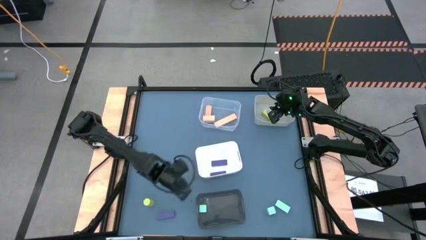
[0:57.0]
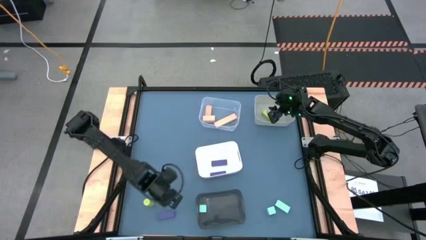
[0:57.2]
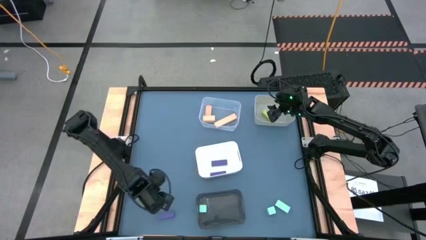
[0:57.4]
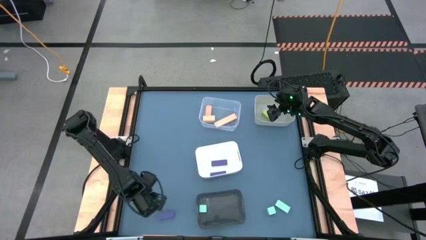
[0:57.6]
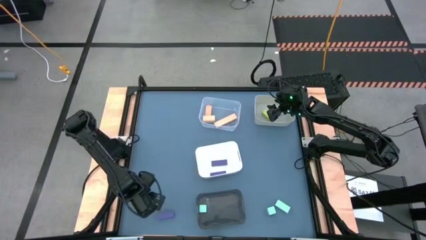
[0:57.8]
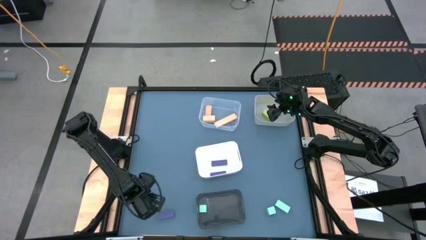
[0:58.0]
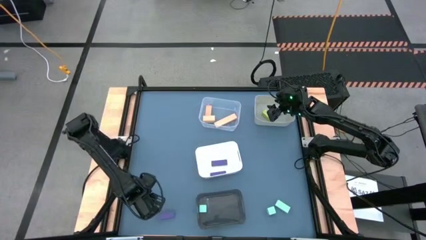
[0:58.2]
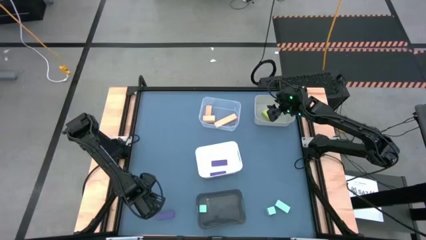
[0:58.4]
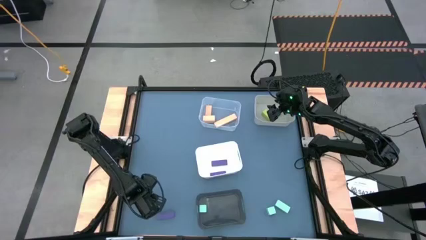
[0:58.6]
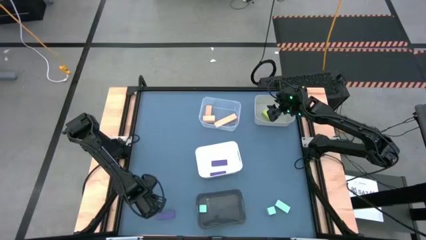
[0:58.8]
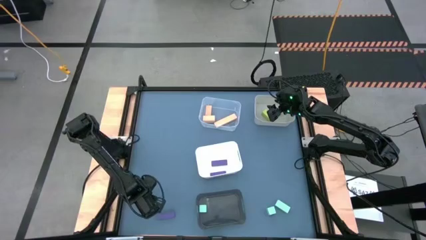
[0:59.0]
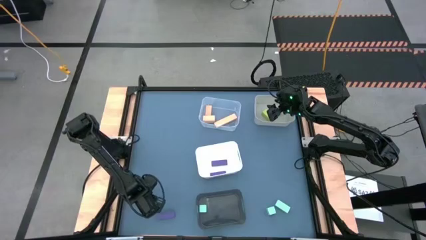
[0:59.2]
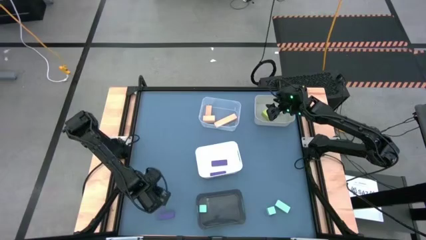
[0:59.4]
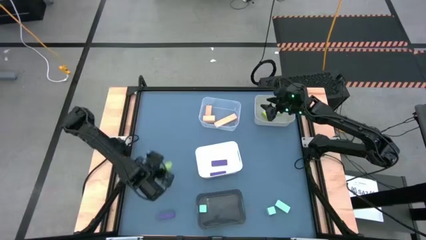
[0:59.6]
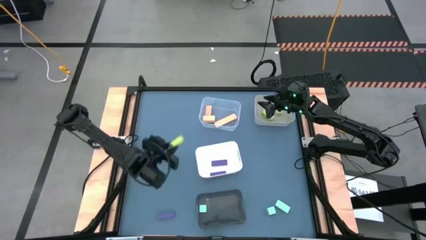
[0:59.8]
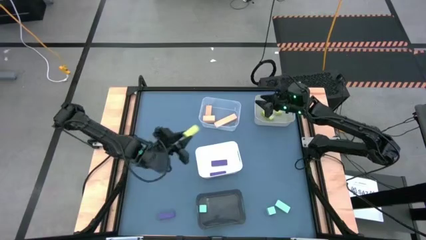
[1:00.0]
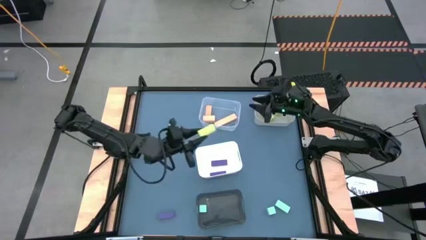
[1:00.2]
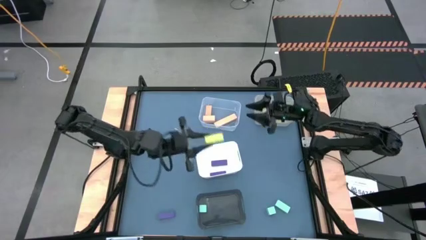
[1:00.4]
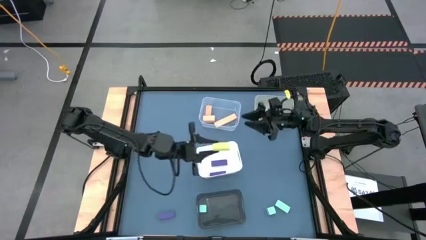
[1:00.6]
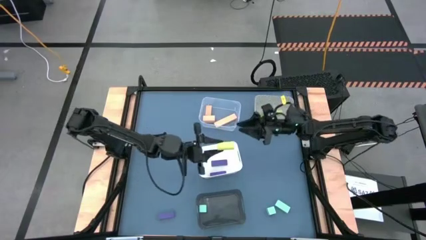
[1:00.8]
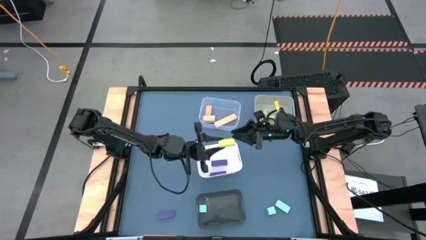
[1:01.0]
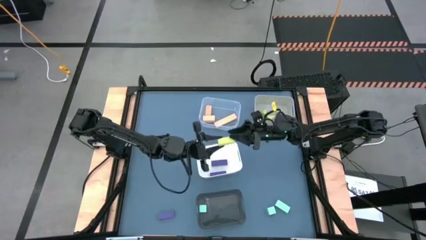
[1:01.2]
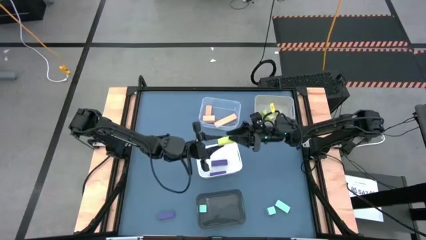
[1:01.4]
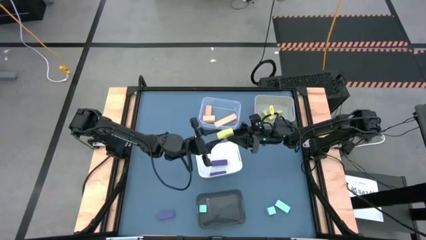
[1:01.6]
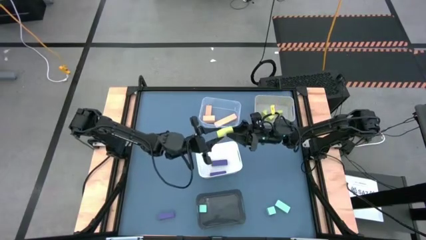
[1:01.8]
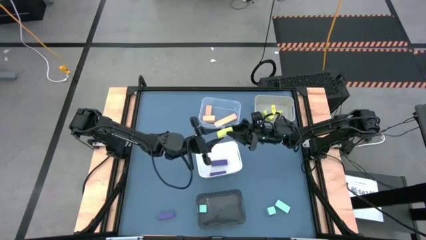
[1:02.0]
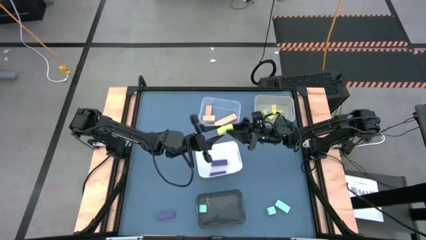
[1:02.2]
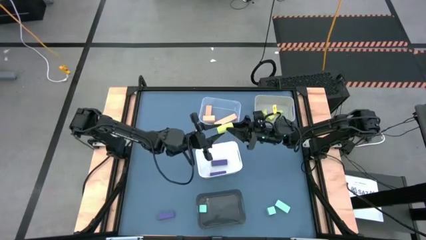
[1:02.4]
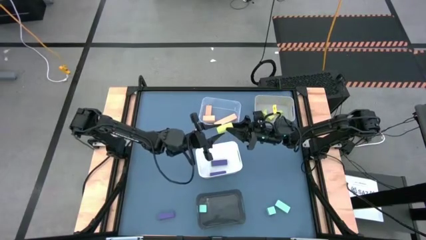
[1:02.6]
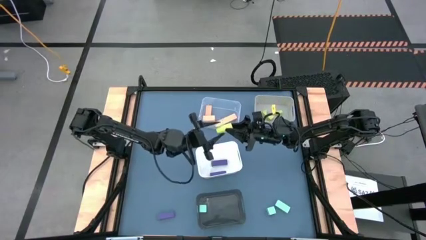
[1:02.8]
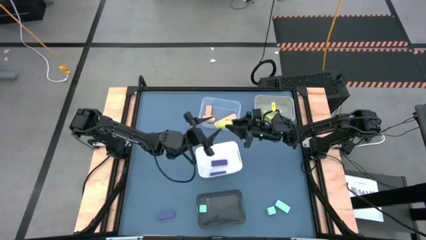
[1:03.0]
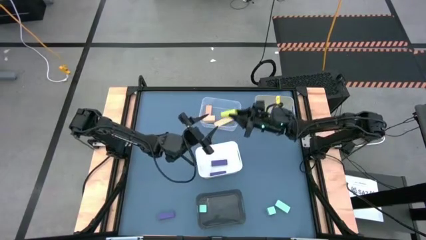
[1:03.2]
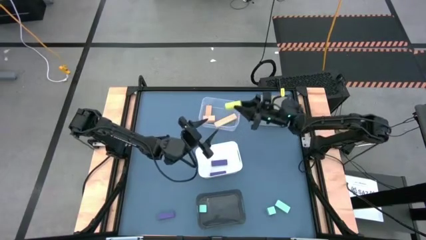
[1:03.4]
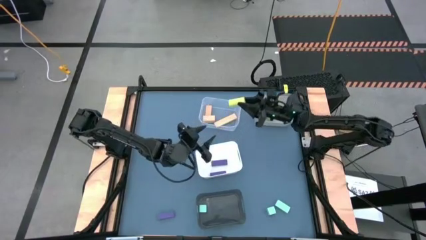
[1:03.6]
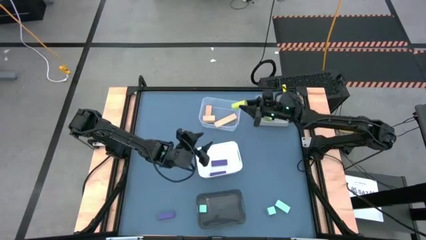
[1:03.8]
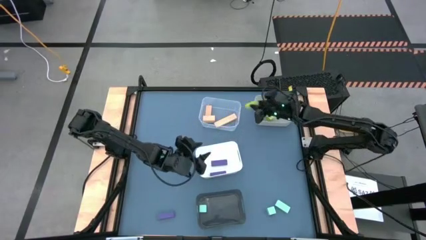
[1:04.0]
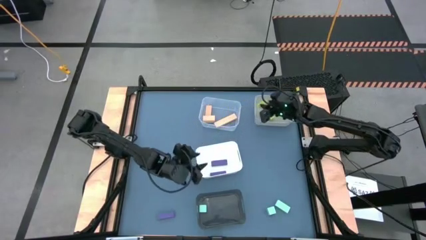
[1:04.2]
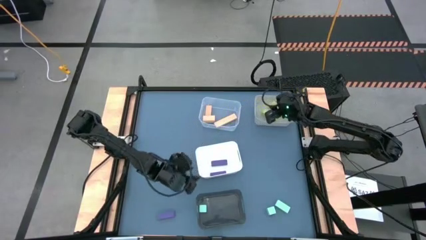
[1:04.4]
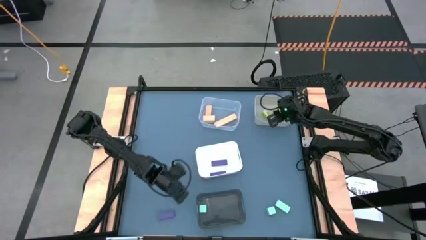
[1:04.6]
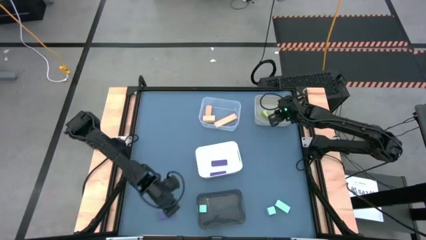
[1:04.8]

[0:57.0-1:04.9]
Task: Sort & place blocks by color
Put the yellow-green round block into the grey bin

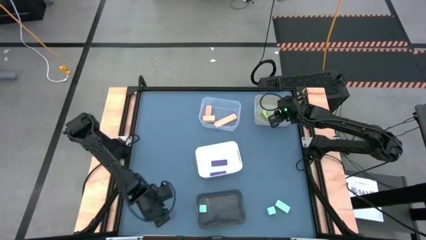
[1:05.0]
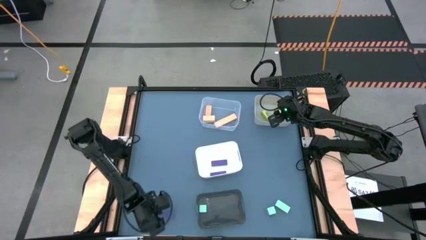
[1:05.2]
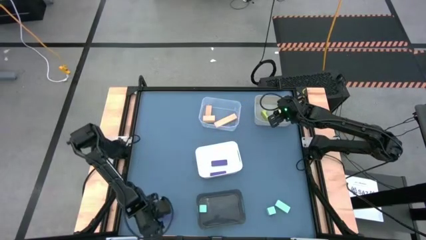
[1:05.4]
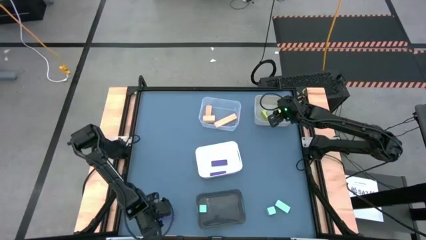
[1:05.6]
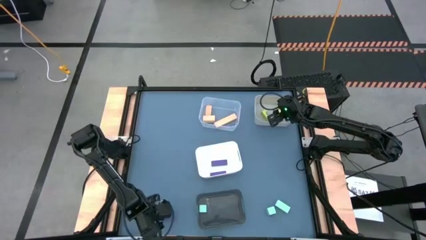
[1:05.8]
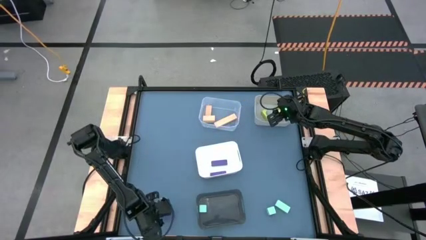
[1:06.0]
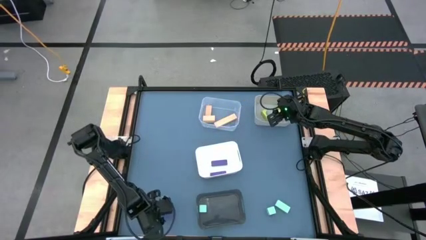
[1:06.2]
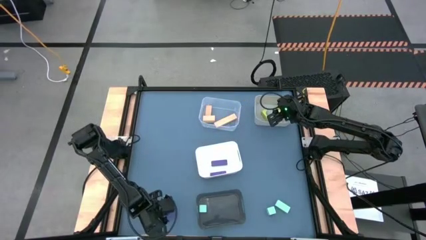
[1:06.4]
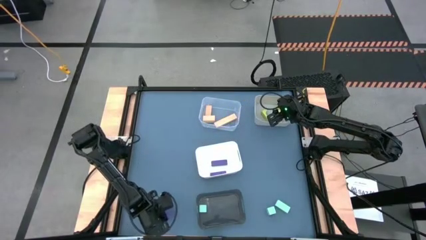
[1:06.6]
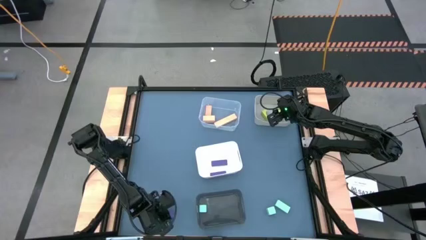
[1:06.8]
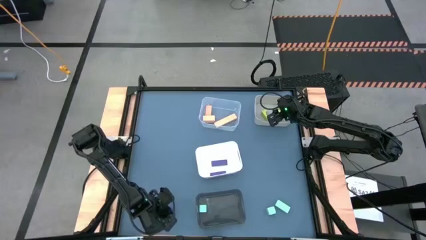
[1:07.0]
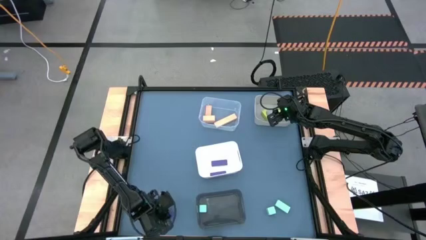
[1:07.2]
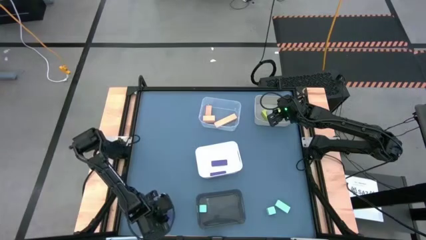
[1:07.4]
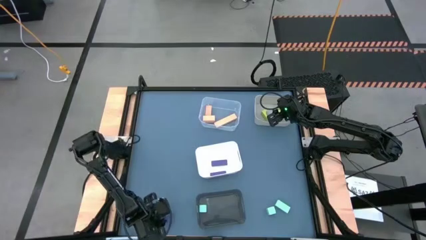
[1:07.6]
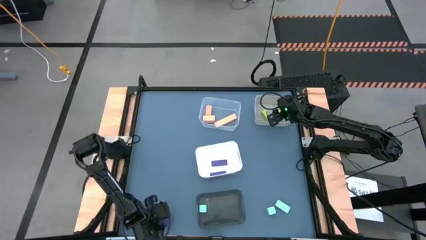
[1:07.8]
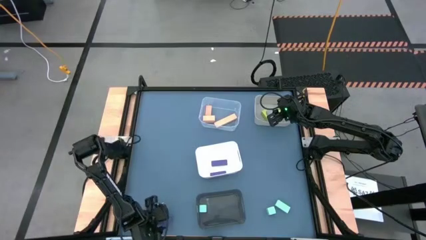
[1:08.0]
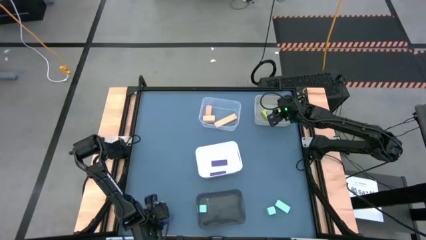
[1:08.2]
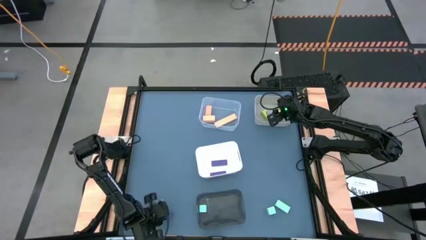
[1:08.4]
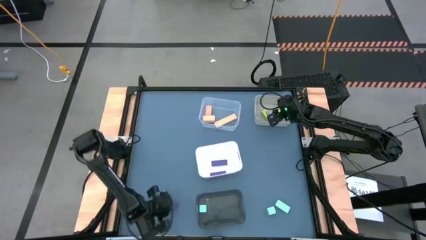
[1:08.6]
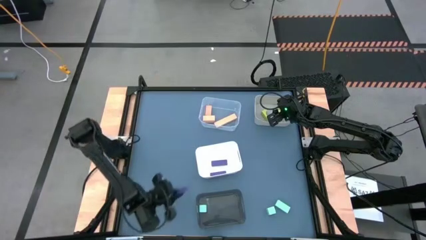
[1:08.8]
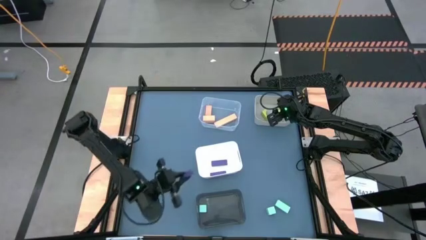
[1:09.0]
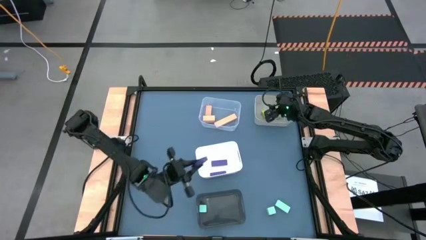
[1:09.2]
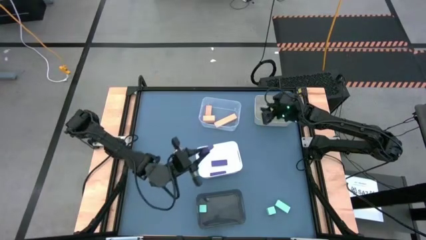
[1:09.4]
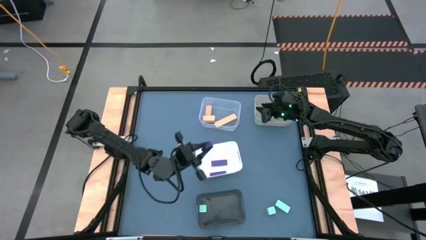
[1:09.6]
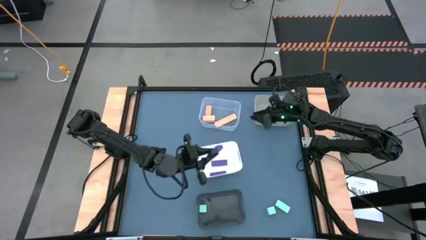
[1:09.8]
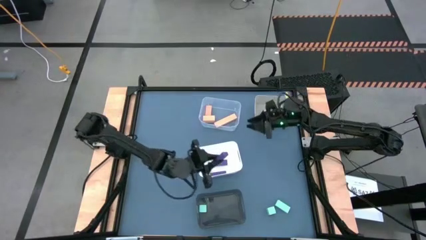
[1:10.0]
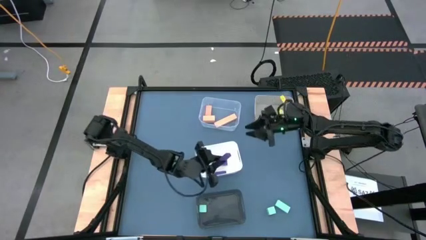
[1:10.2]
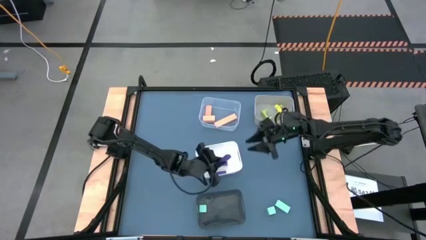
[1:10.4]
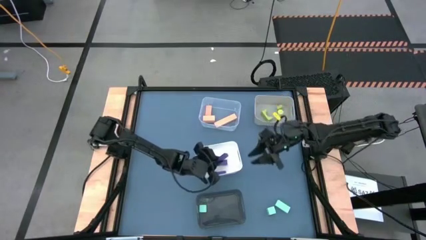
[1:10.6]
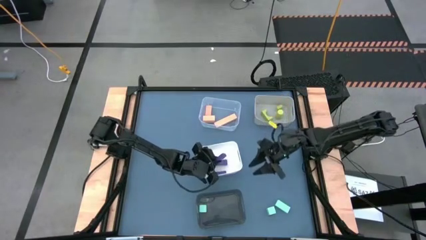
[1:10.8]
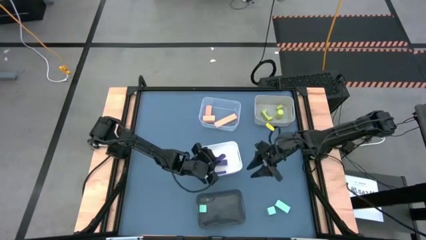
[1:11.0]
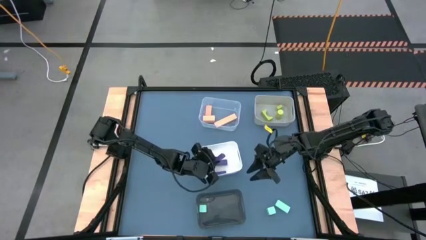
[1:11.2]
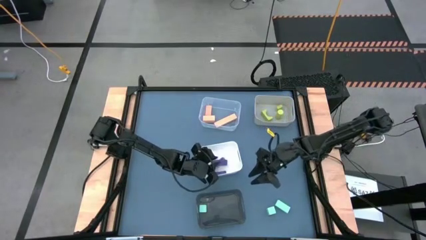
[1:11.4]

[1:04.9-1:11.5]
Put the purple rectangle block into the white bin

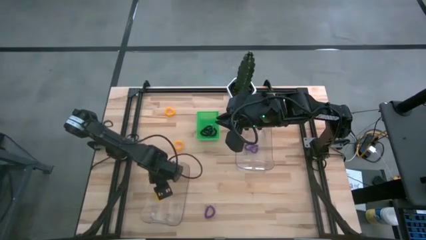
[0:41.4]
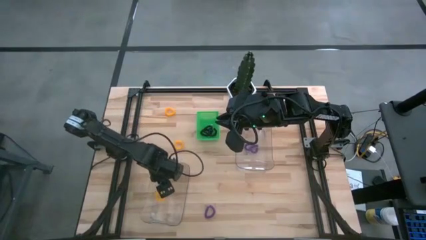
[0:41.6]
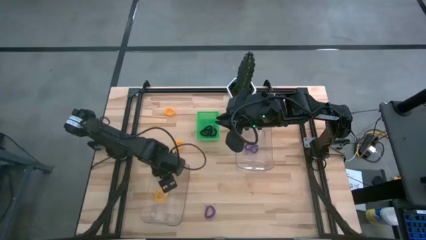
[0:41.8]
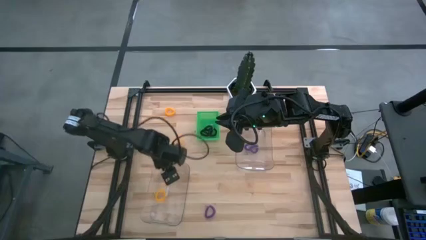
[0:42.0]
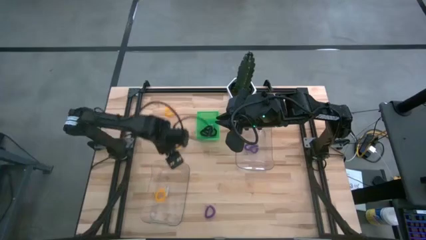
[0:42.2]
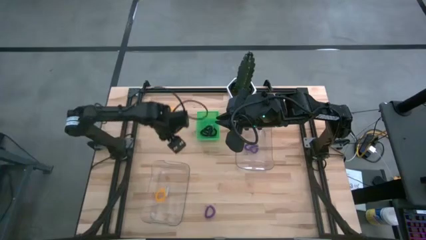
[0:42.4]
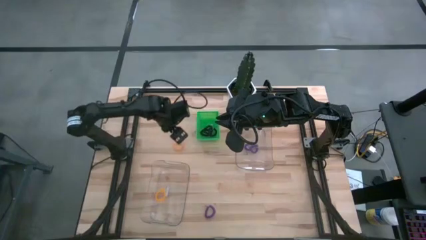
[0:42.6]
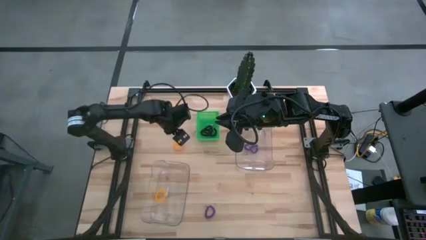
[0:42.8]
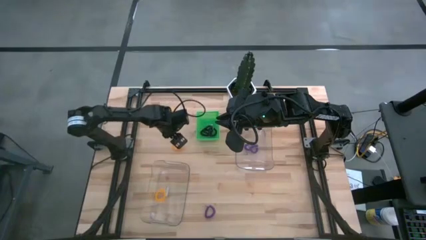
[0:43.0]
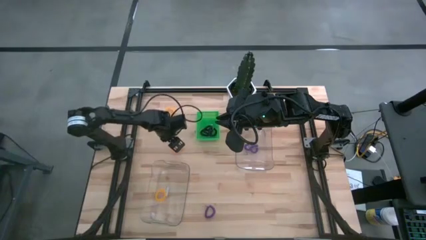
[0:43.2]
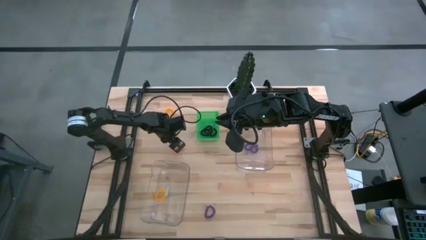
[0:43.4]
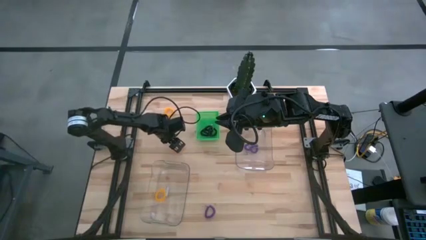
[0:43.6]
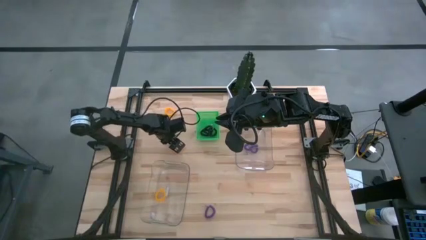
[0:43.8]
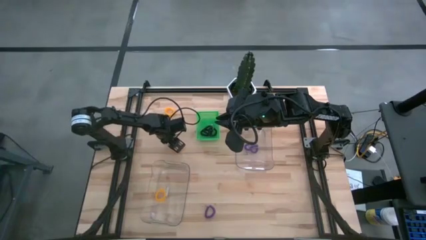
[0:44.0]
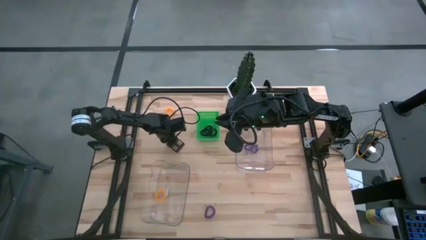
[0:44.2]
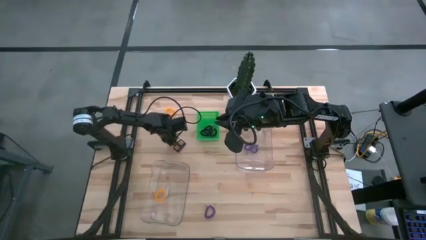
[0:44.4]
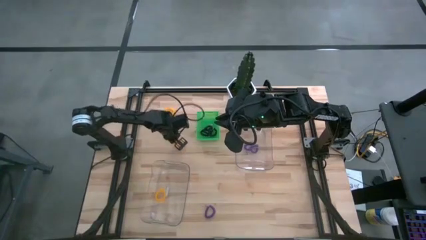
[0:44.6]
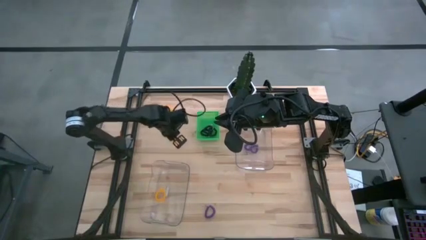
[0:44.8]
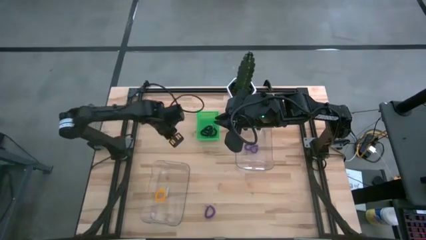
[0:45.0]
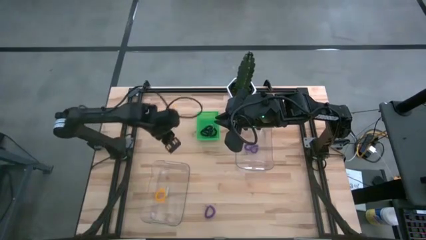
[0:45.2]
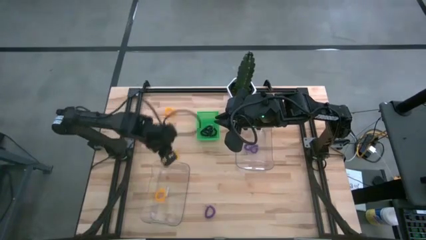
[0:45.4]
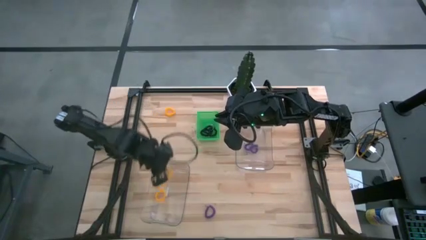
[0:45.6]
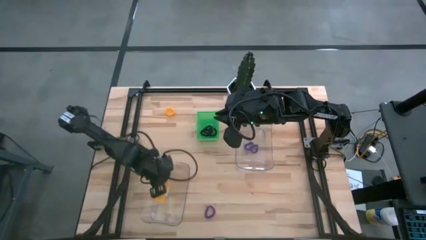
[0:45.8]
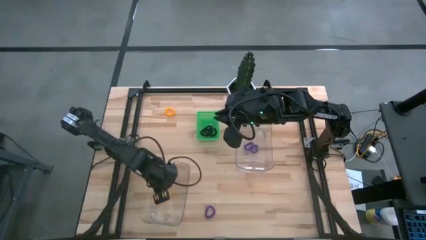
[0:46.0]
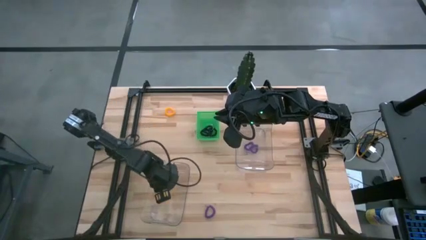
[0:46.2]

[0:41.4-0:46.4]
Task: Sort spring keychains
Put the yellow spring keychain into the bottom transparent bin
